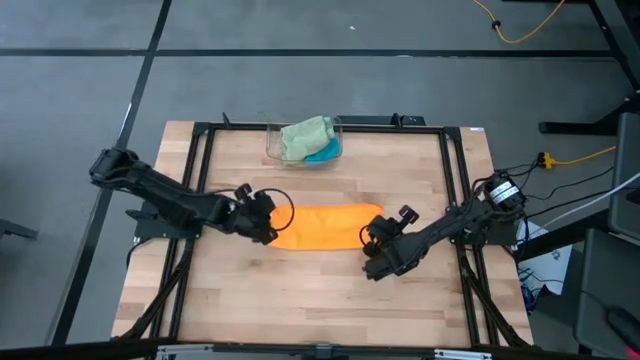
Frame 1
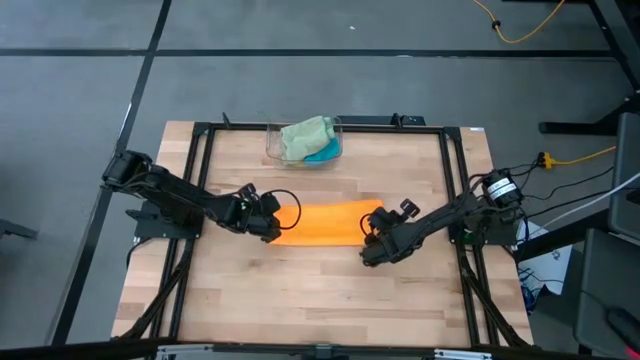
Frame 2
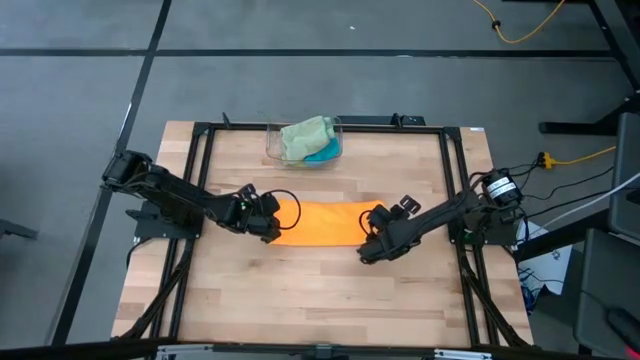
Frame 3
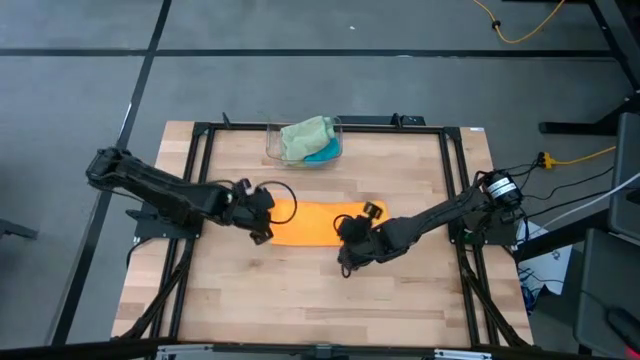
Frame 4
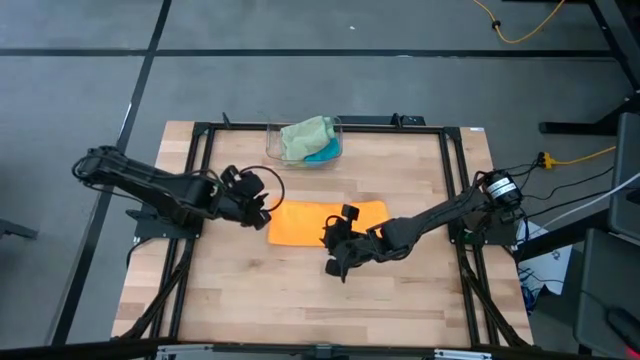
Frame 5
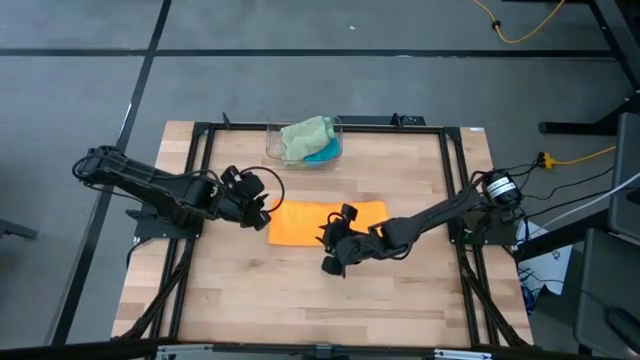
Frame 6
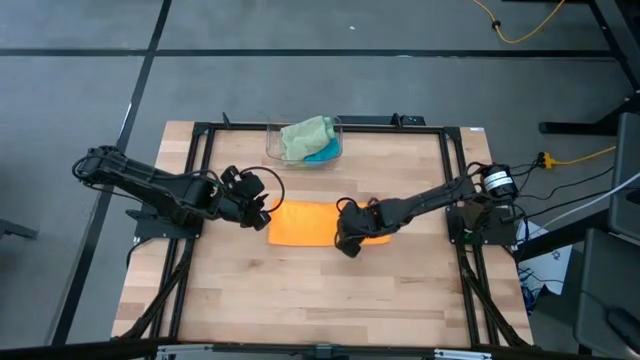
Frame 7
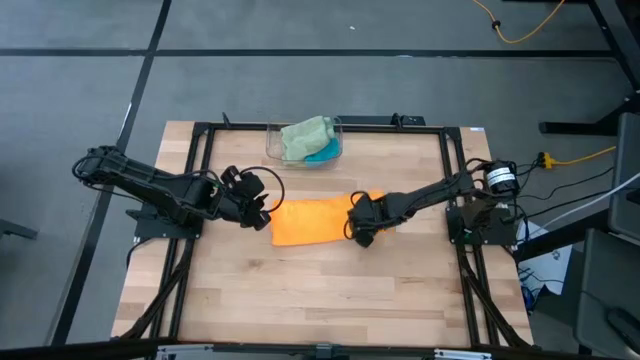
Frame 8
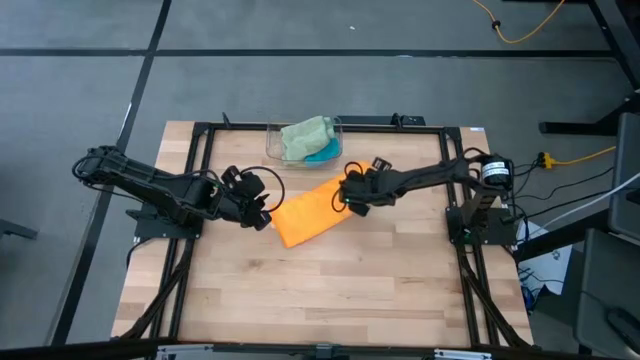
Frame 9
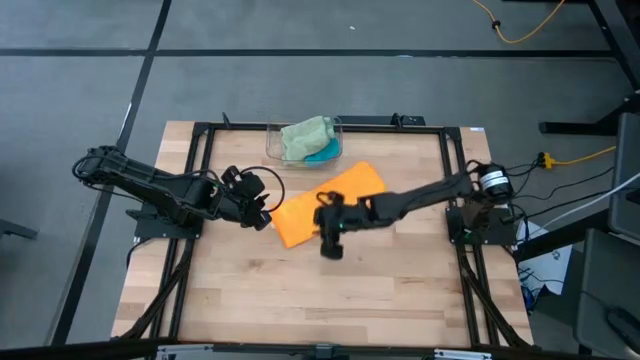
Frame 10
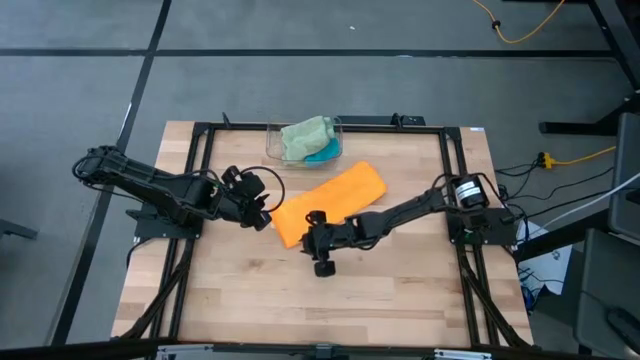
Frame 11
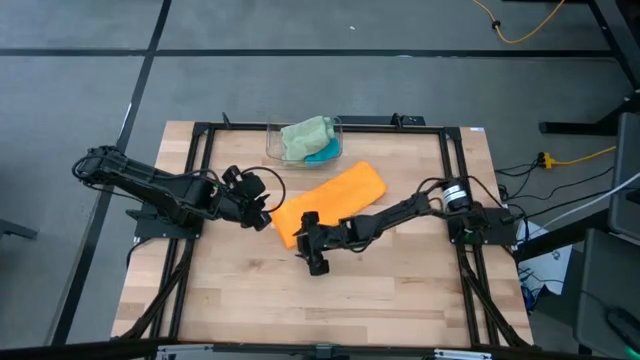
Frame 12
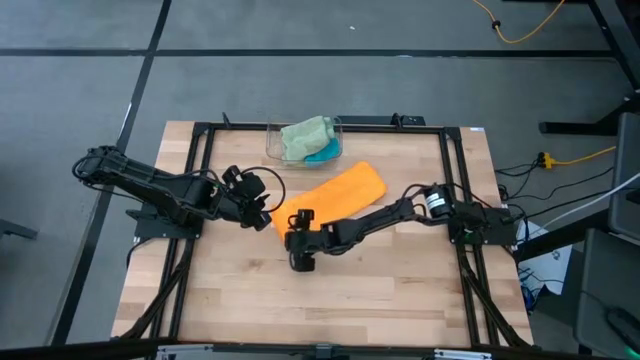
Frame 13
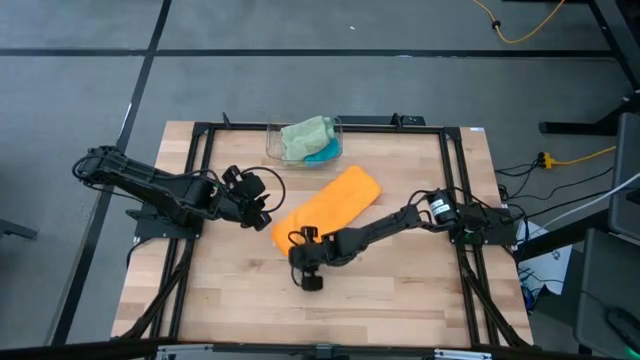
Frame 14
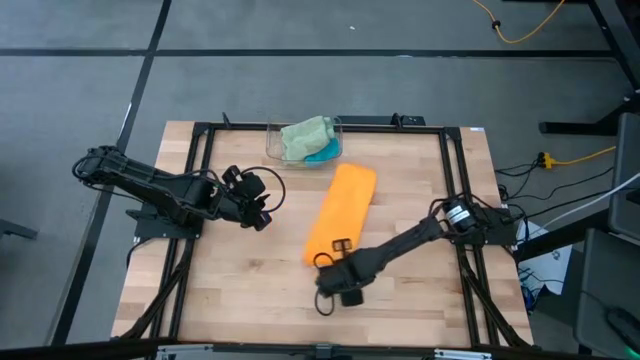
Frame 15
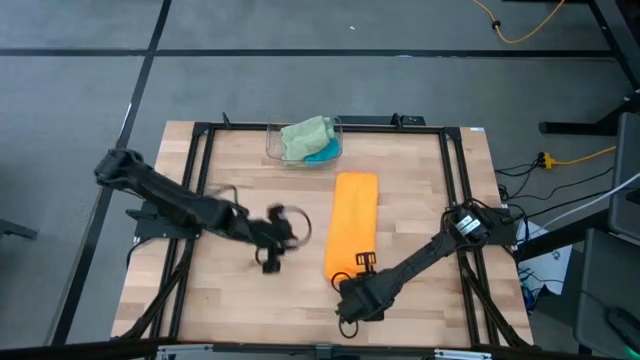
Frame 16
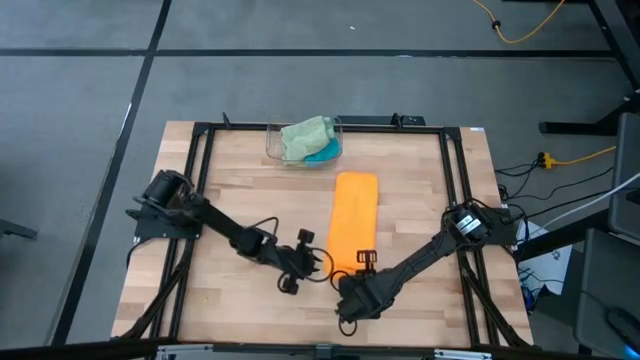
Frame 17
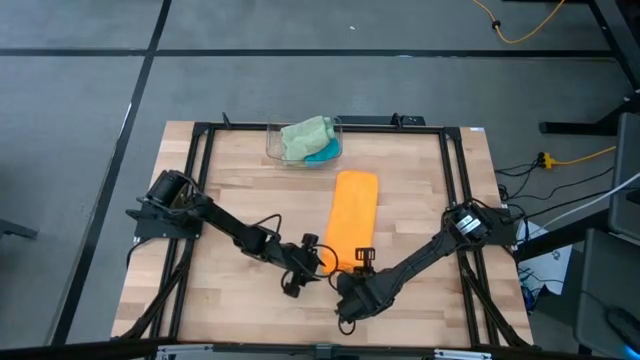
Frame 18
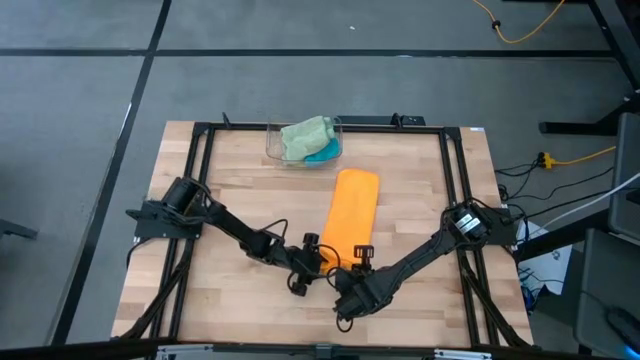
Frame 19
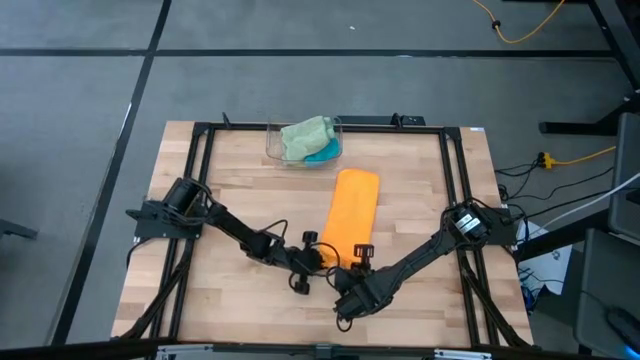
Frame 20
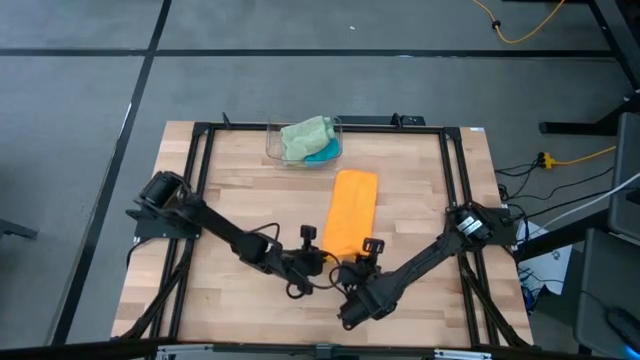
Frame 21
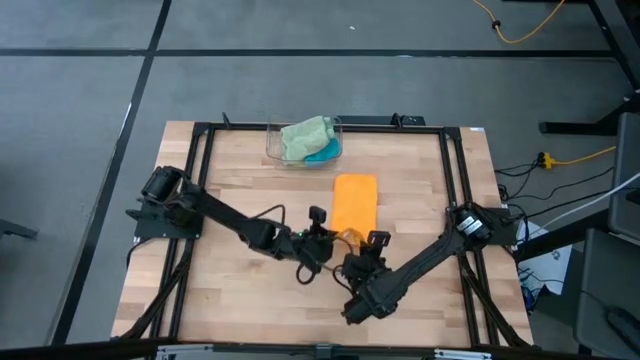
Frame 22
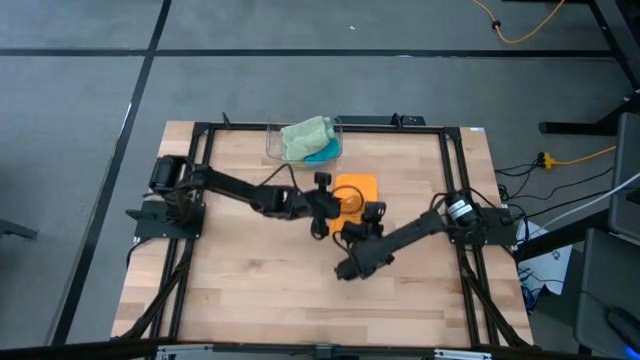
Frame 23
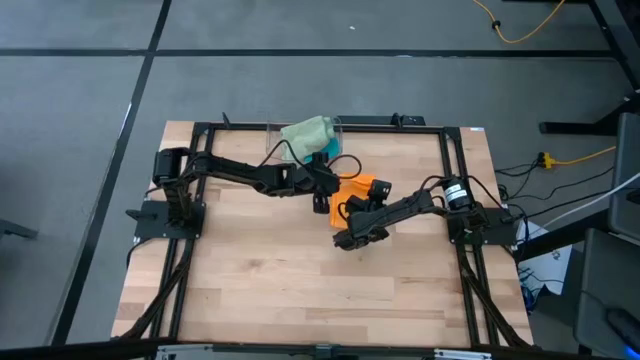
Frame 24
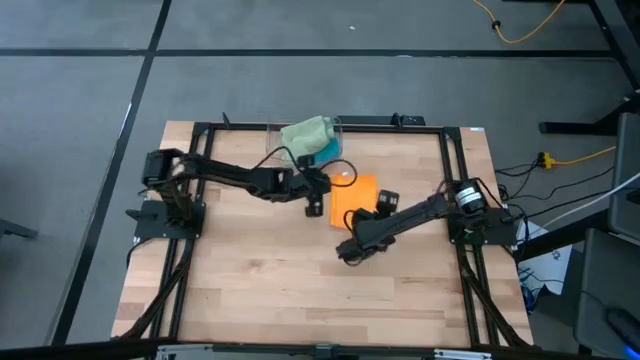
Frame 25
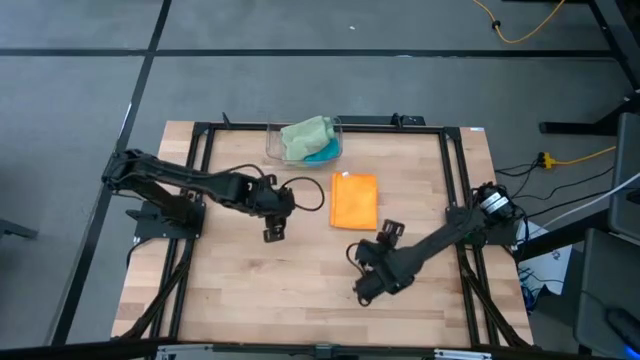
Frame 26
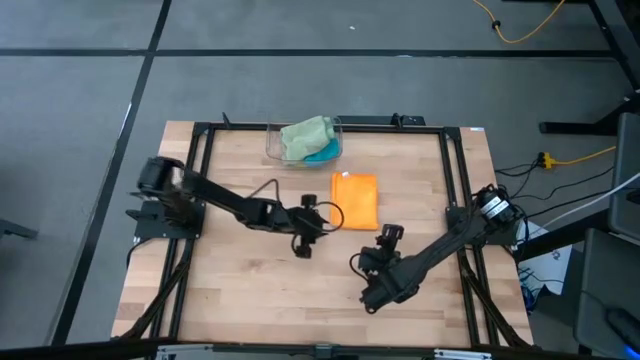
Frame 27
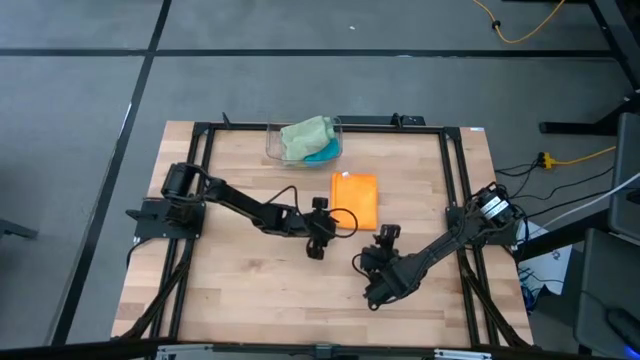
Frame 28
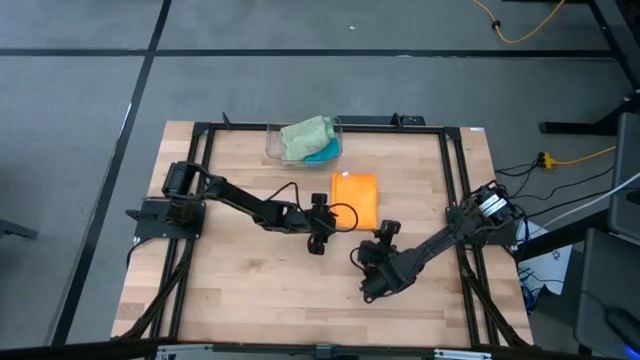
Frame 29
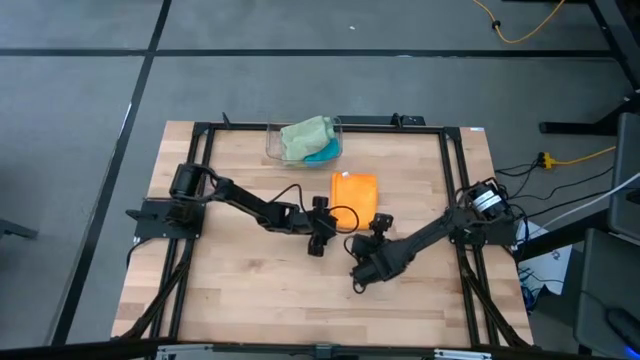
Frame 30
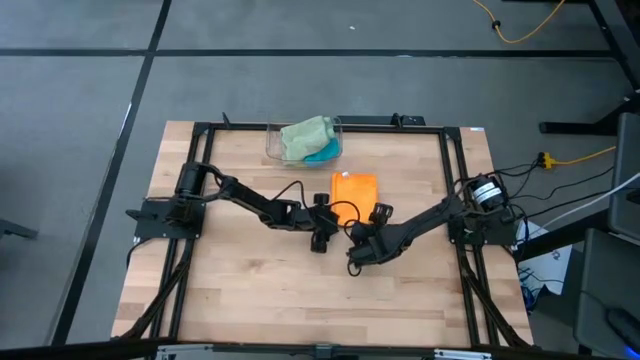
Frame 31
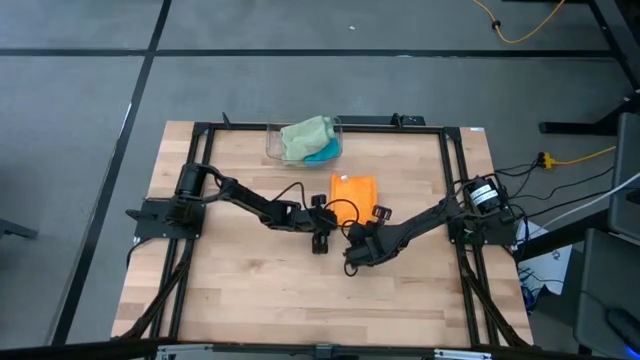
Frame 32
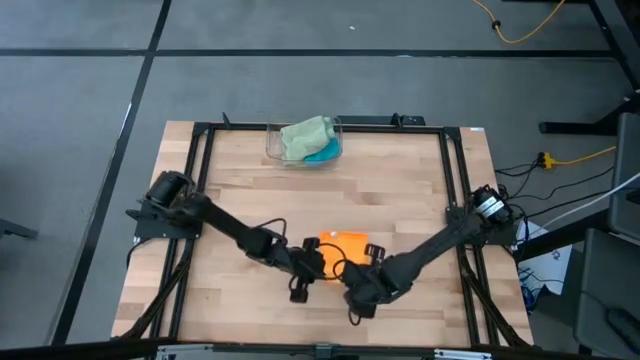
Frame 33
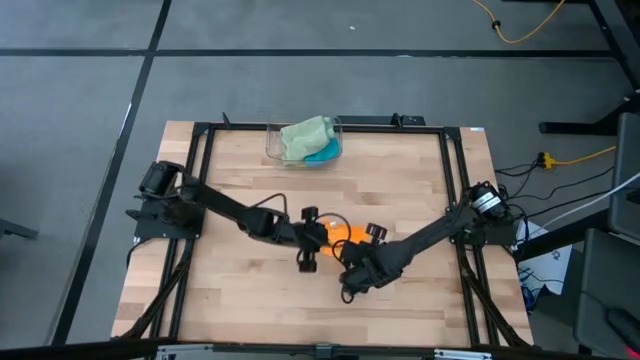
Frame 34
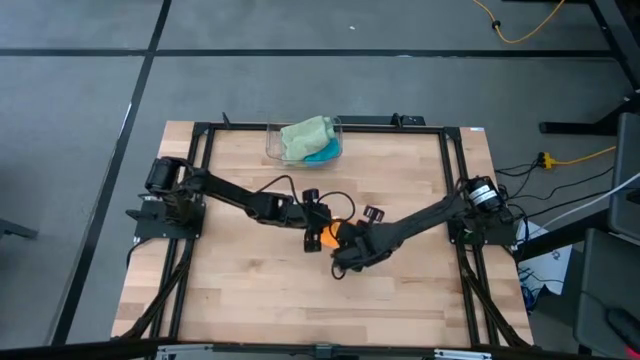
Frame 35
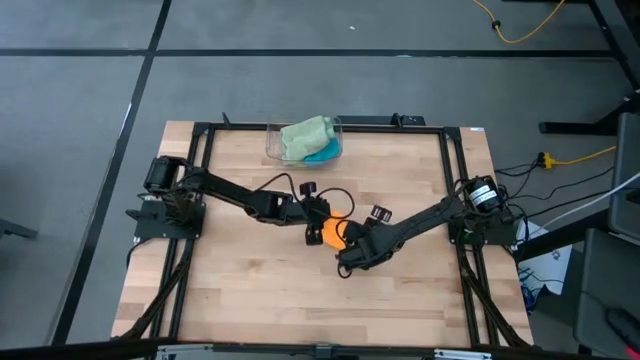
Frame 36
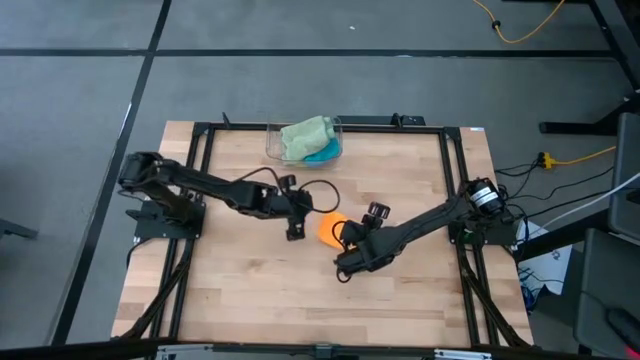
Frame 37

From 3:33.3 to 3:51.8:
Task: Fold microfiber towels
Fold the orange towel

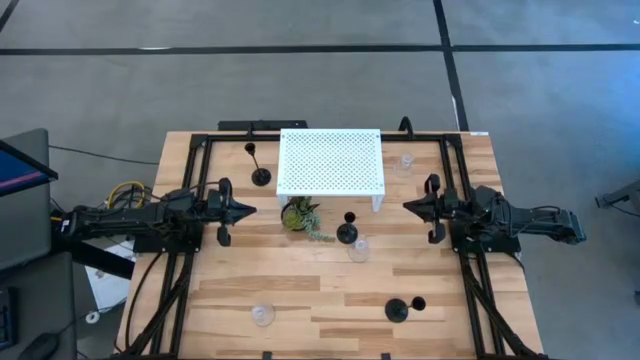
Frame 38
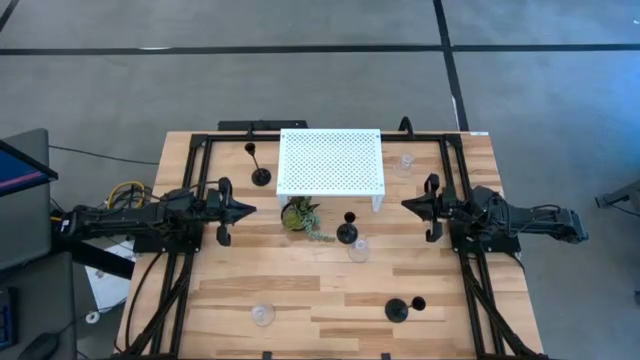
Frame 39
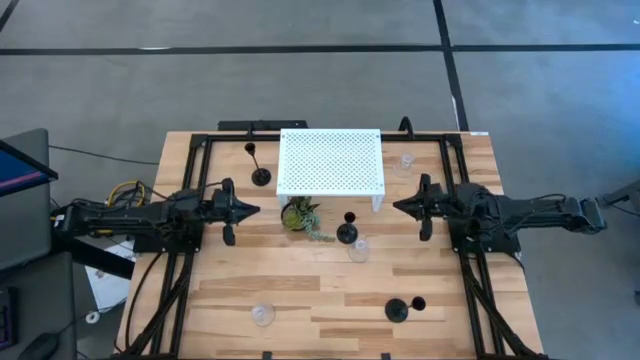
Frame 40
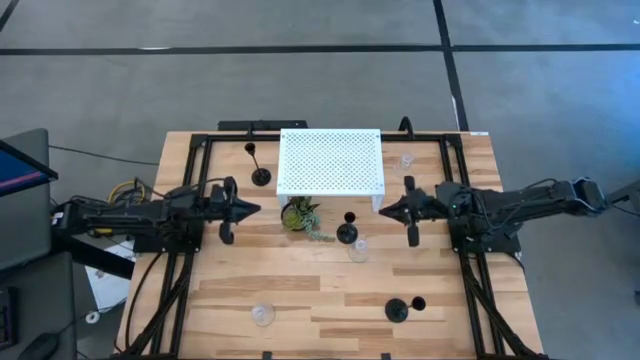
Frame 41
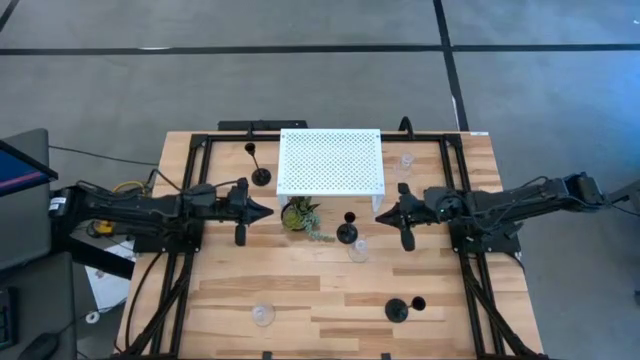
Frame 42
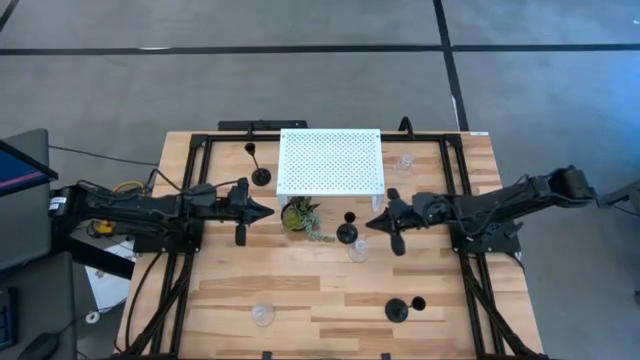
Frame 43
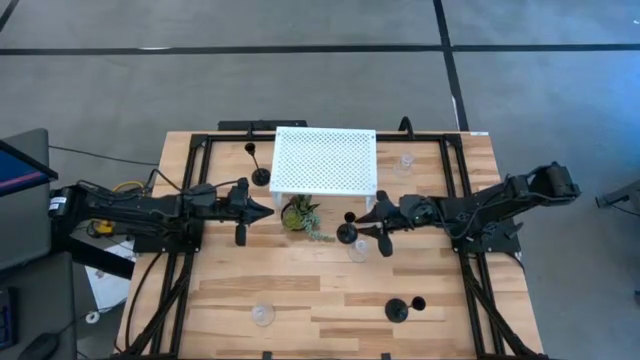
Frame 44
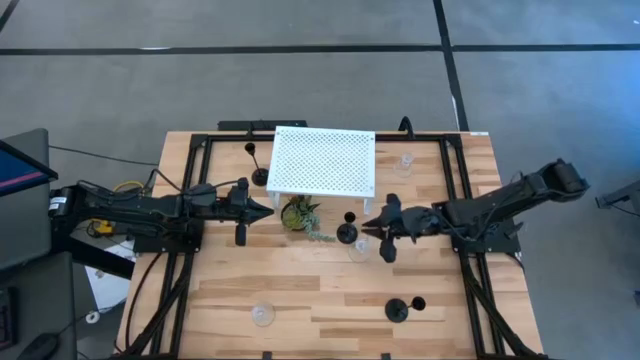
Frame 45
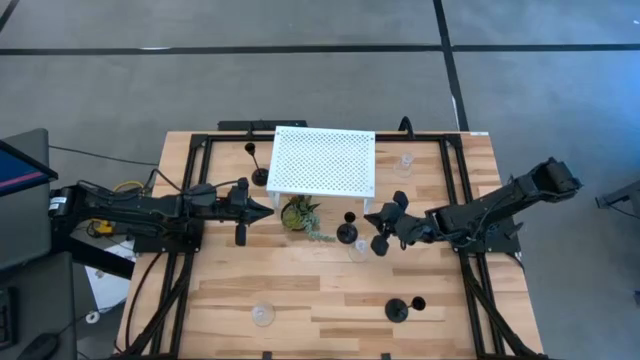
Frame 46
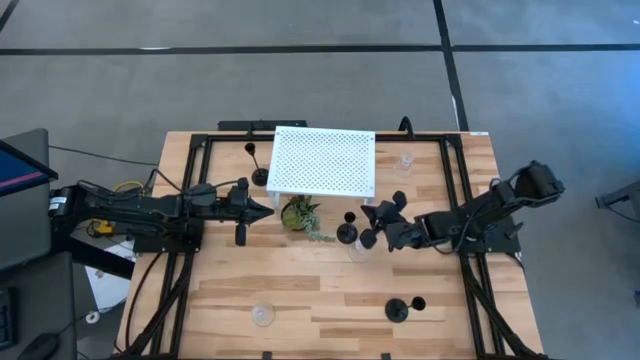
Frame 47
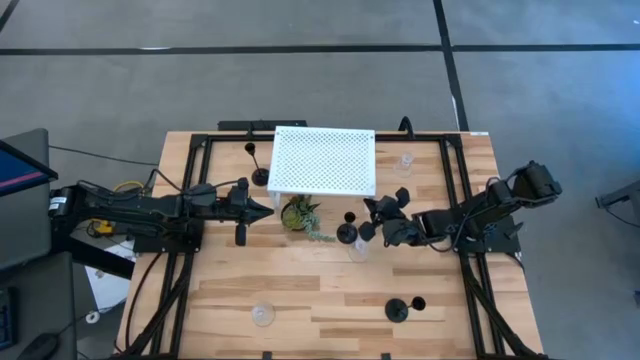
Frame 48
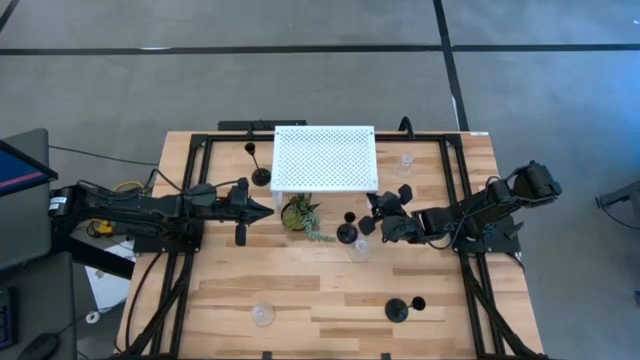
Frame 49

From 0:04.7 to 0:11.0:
Task: Pick & Place candle stick holders
Adjust the shelf
